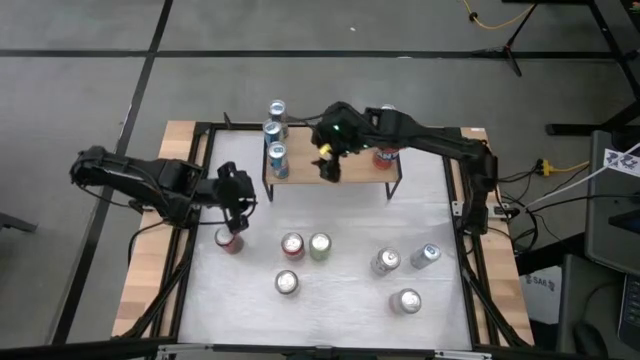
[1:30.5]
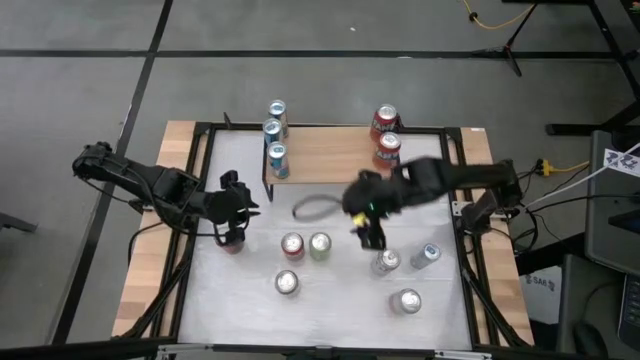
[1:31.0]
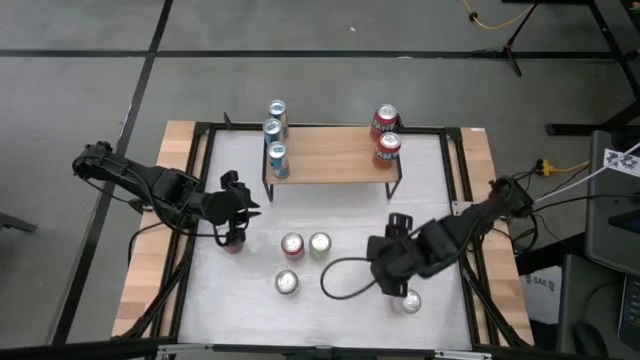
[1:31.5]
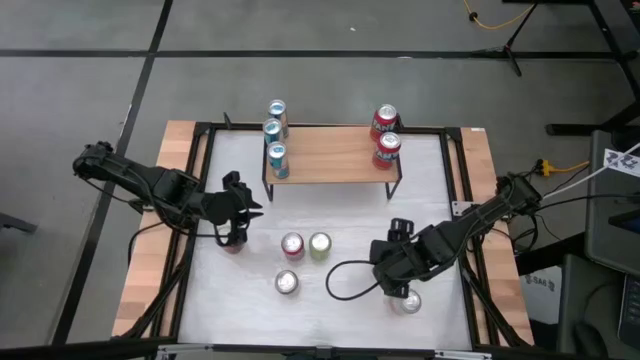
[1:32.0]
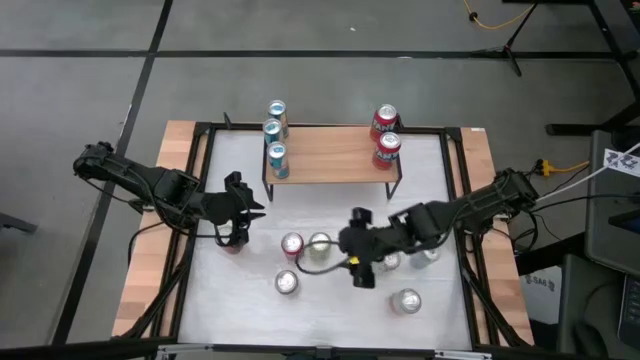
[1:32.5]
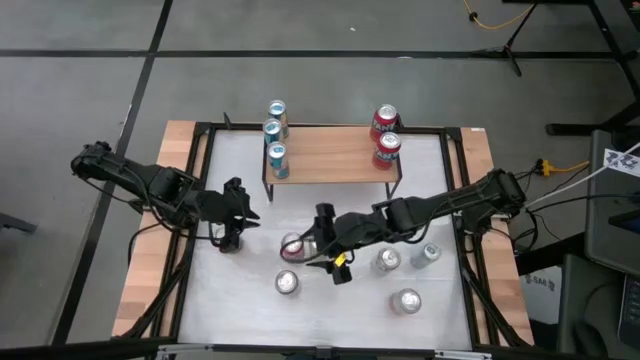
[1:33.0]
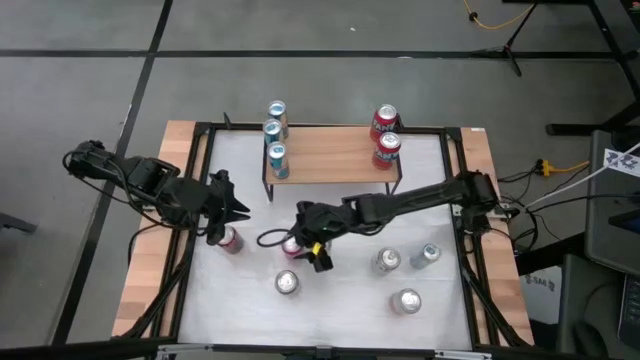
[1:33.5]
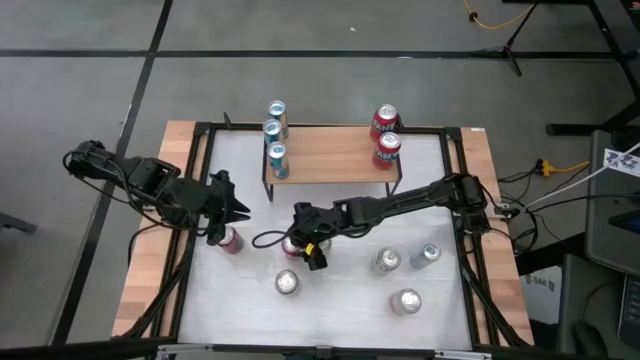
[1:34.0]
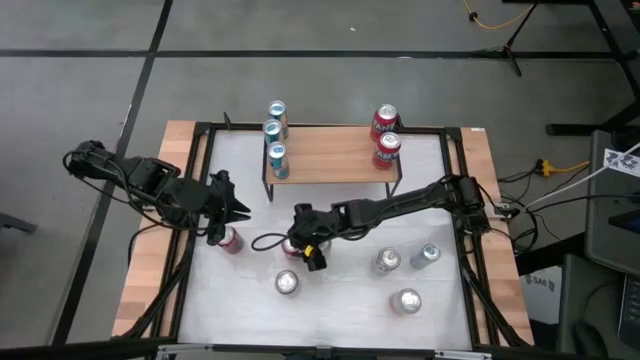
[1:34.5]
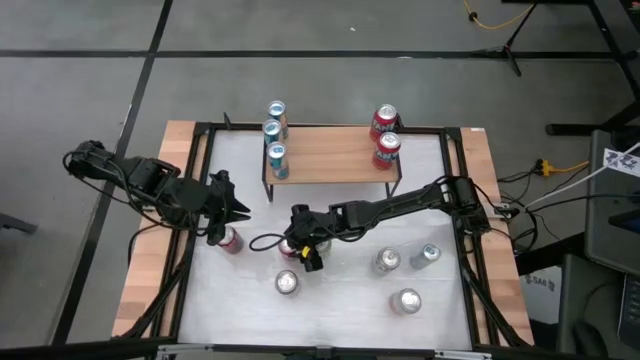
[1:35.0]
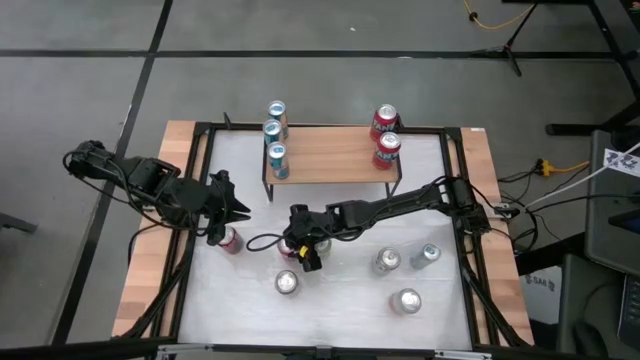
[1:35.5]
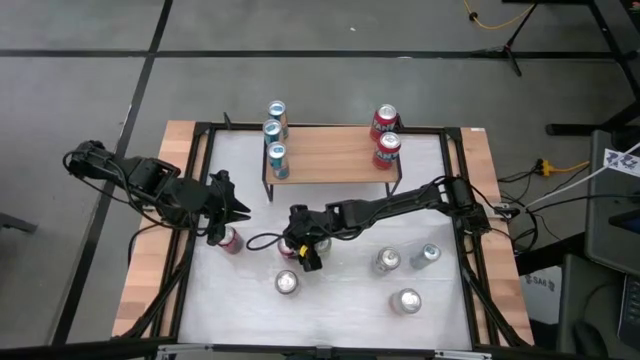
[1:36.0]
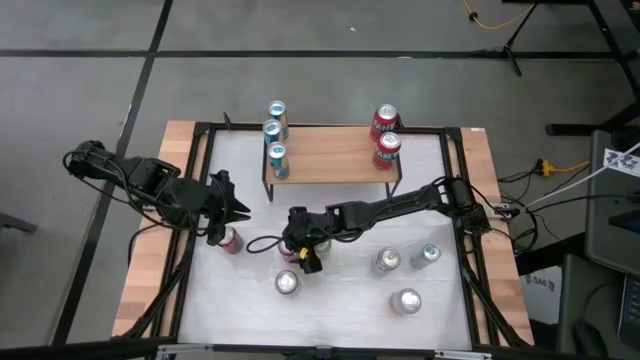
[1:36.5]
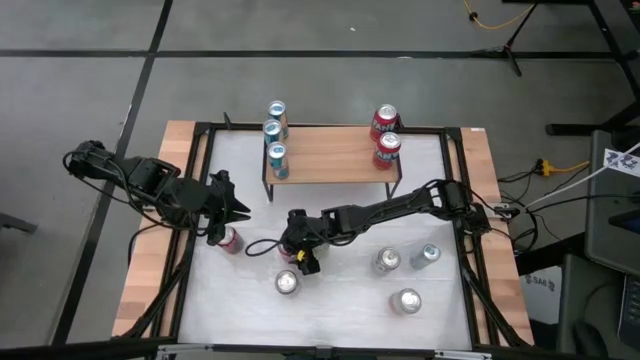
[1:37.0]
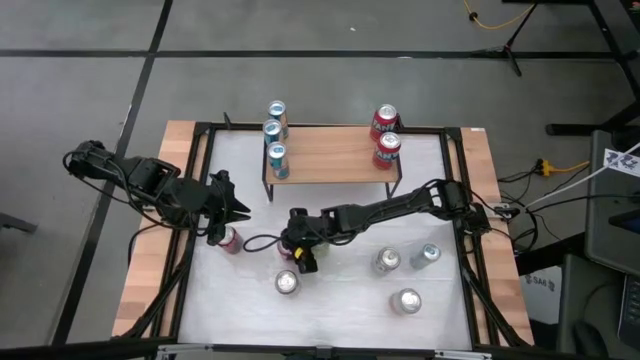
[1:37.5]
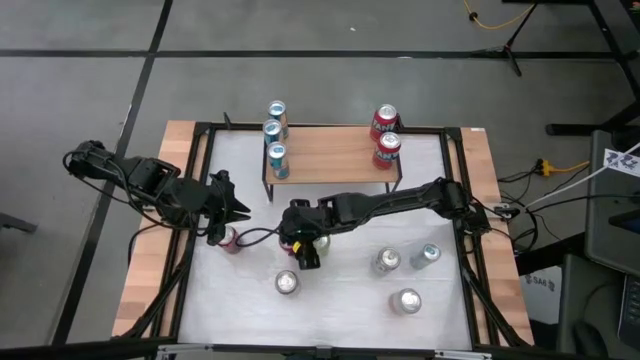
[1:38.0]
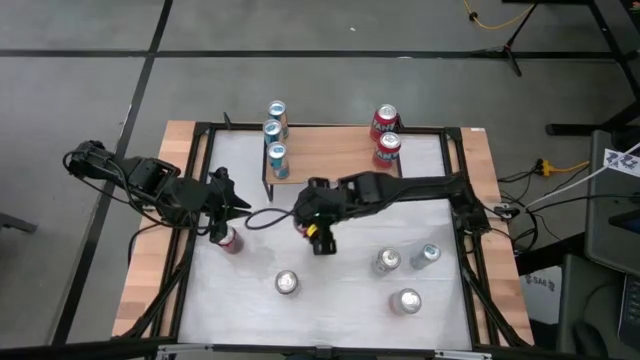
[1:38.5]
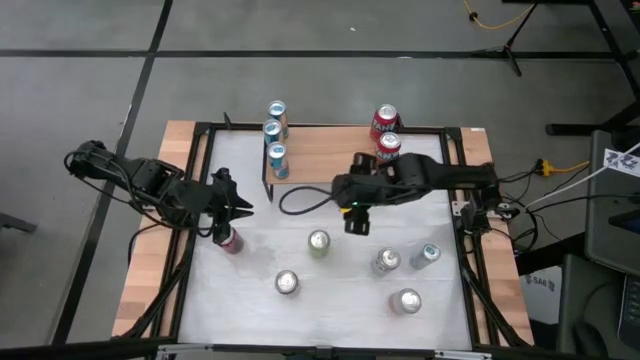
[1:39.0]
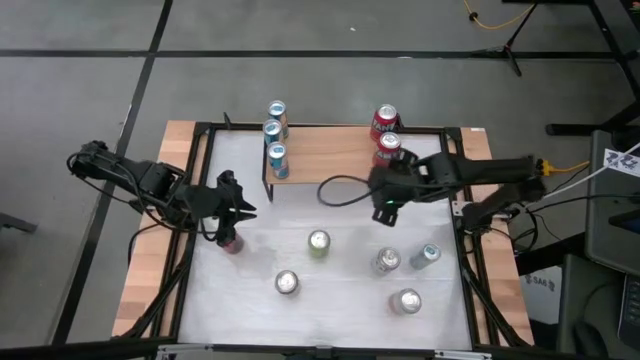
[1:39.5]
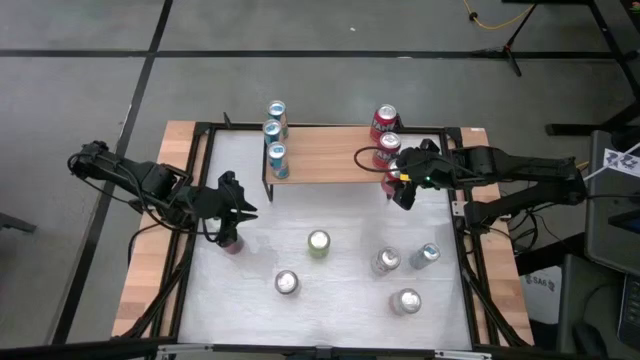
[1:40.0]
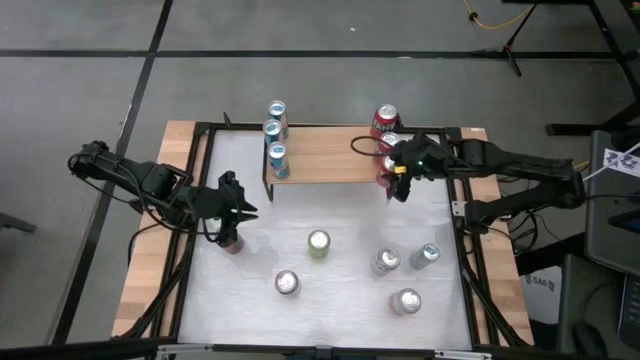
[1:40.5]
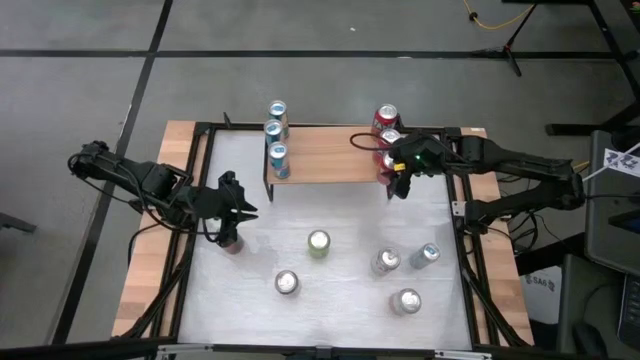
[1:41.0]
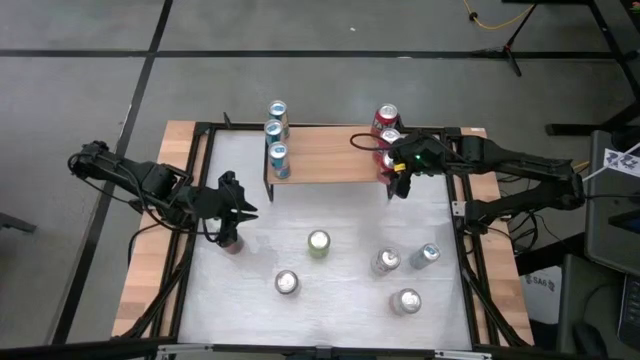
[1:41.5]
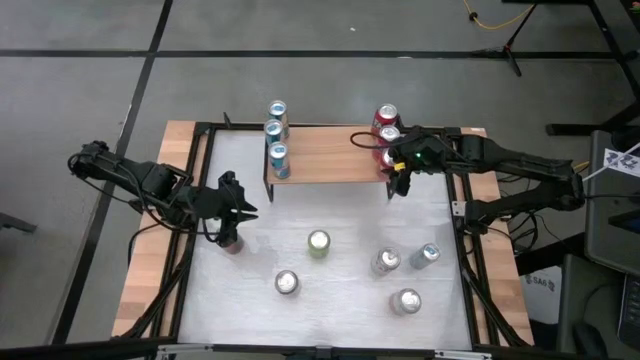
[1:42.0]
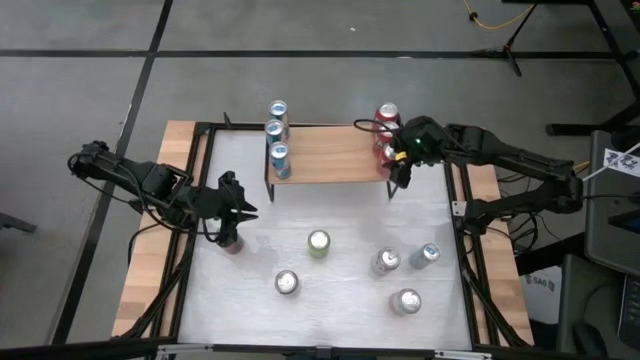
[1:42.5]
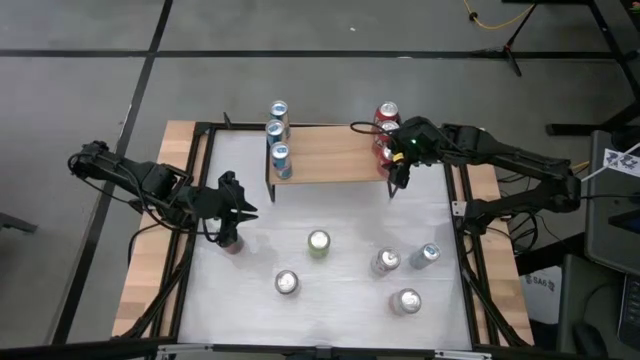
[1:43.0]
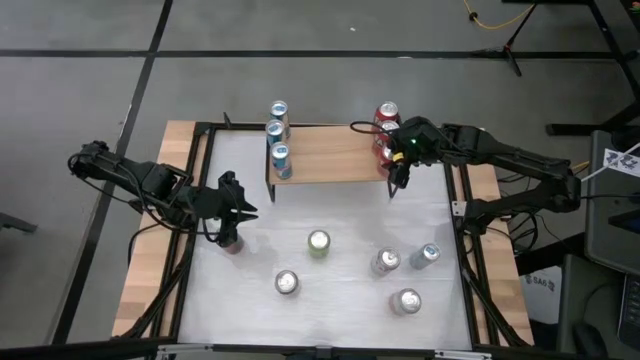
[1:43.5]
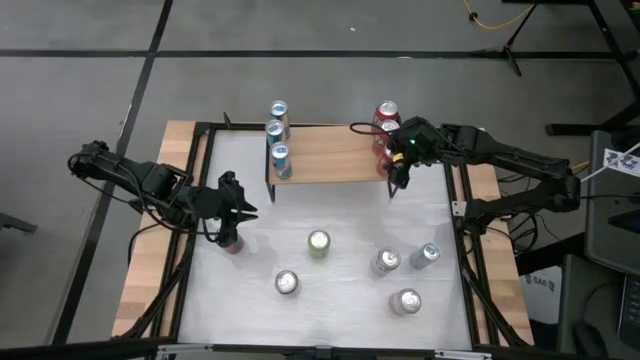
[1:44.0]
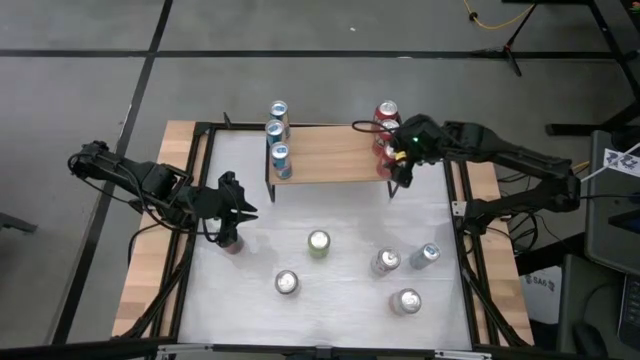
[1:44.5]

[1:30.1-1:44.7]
Task: Sort soda cans
Put the red soda can on the shelf aligned with the red soda cans

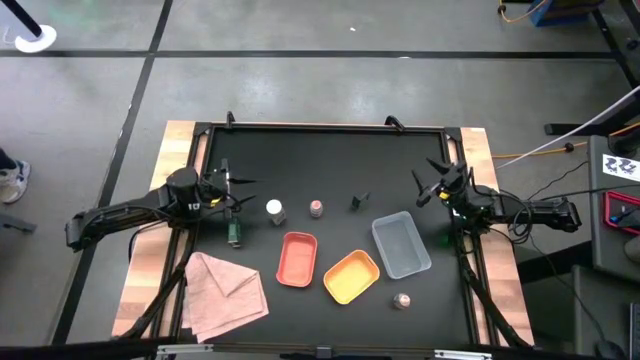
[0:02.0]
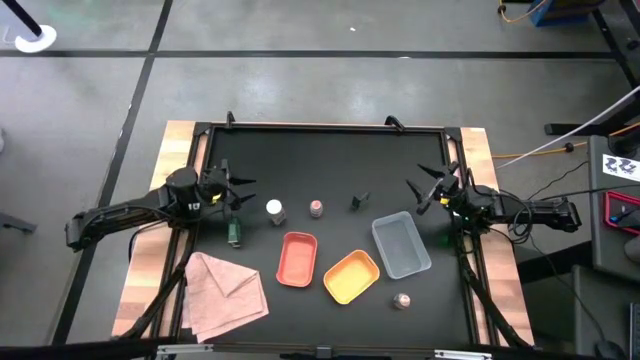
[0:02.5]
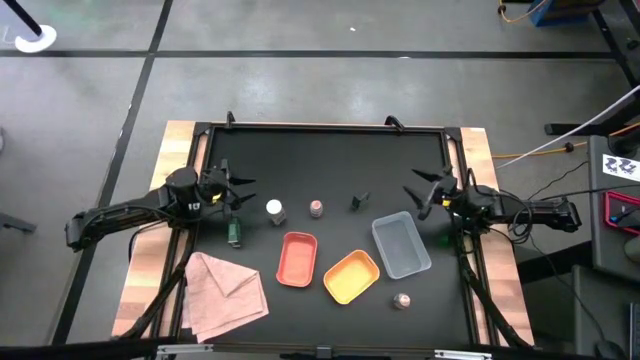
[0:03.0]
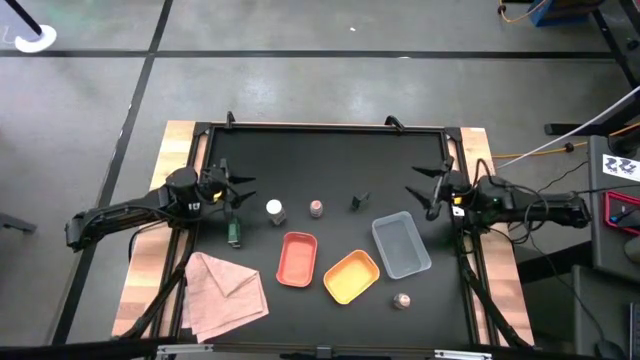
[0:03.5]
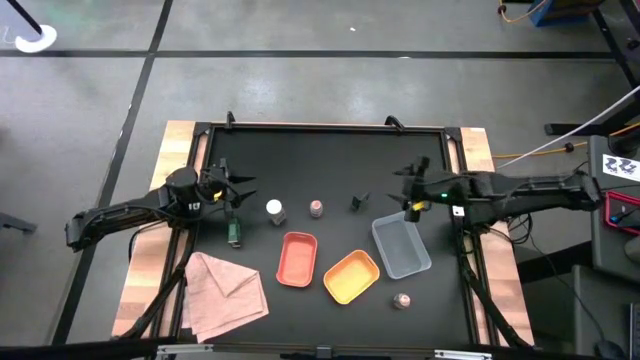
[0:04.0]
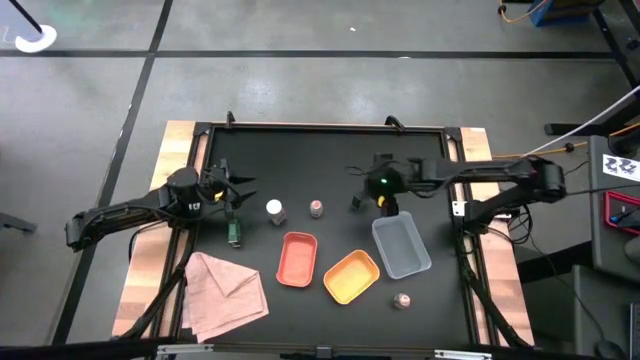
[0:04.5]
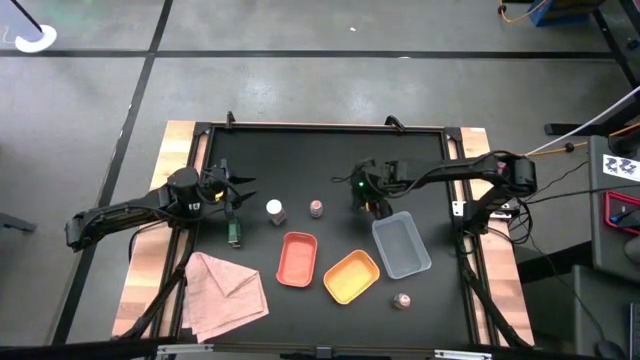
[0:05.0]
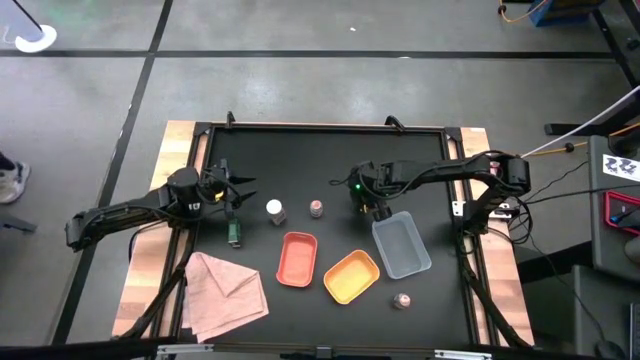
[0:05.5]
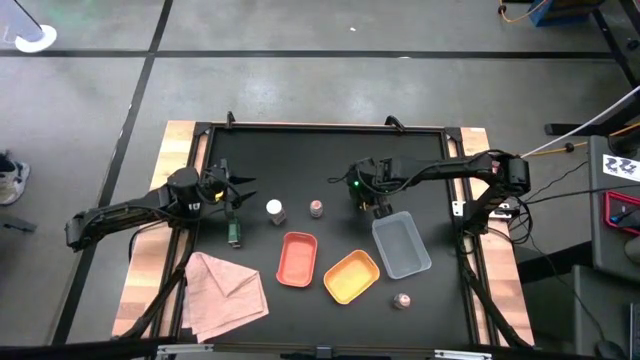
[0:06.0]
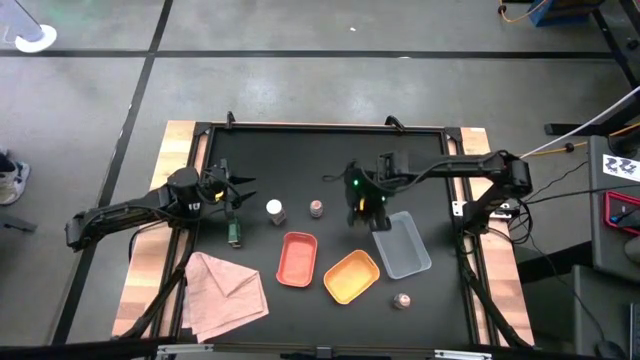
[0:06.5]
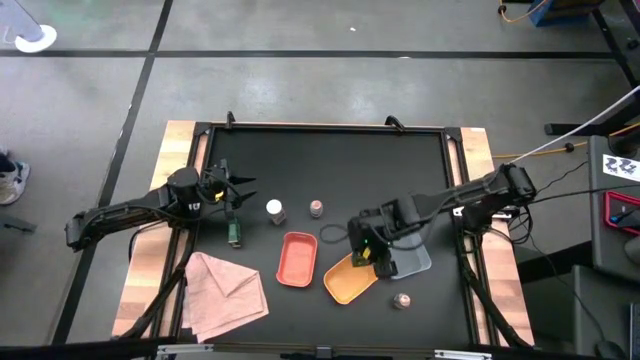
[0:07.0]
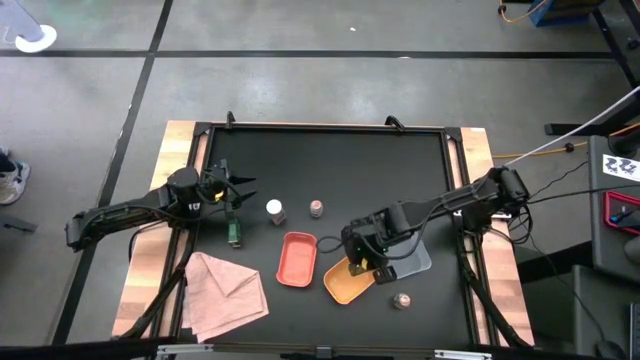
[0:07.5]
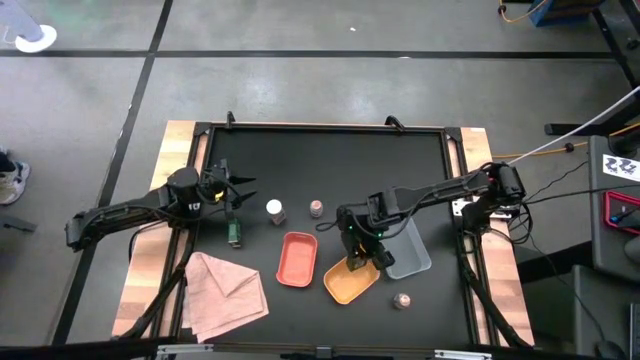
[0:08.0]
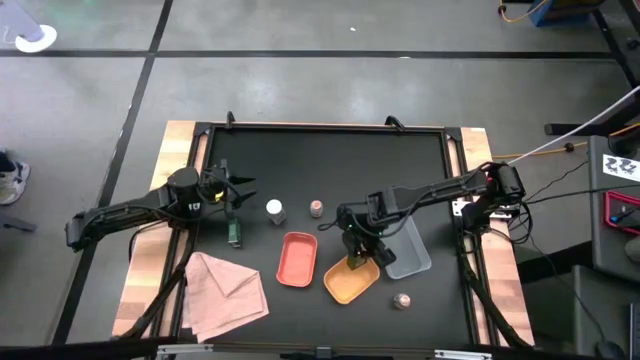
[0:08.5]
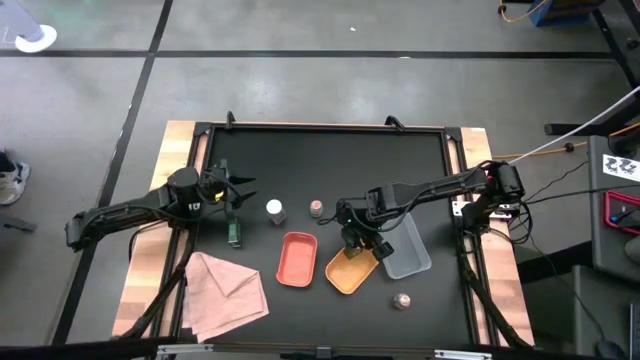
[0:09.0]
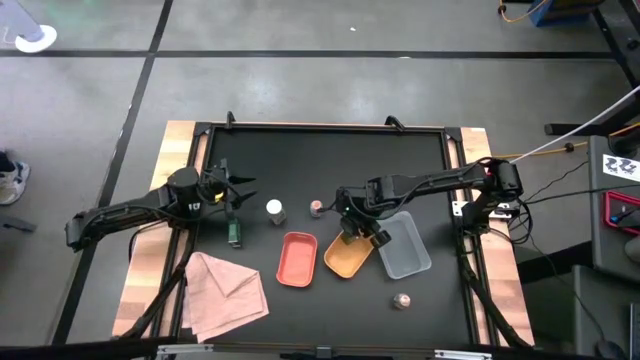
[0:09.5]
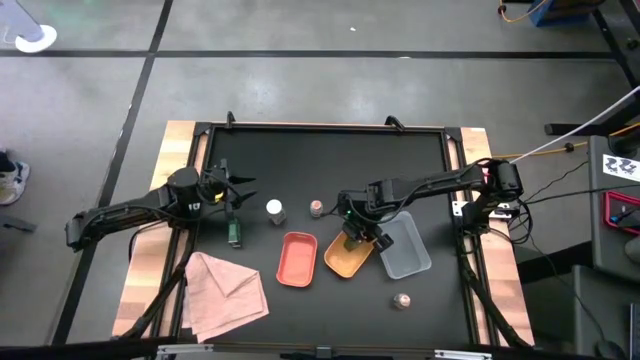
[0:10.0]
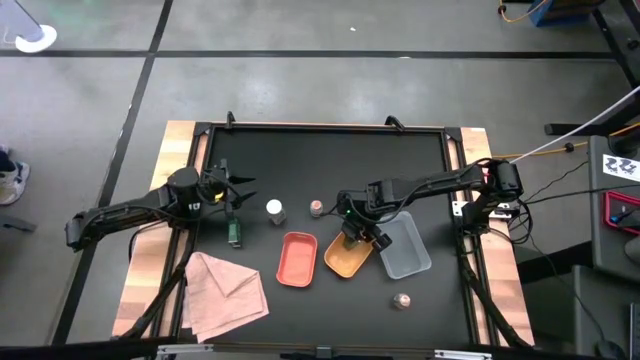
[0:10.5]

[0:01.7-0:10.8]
Task: Sort spices by type
Put the right black spice can into the yellow bin
